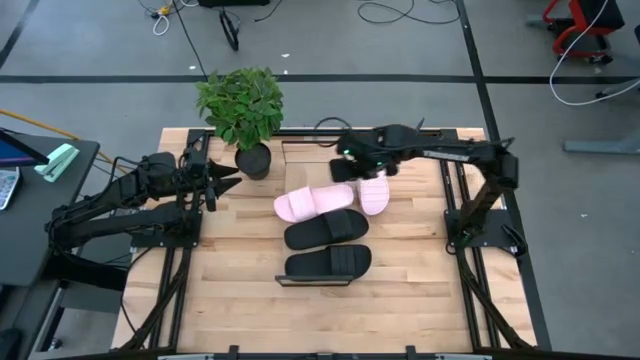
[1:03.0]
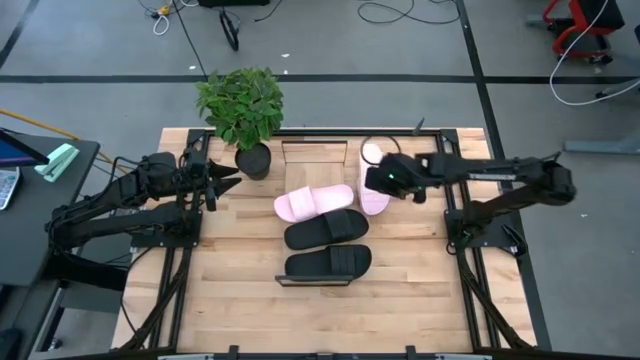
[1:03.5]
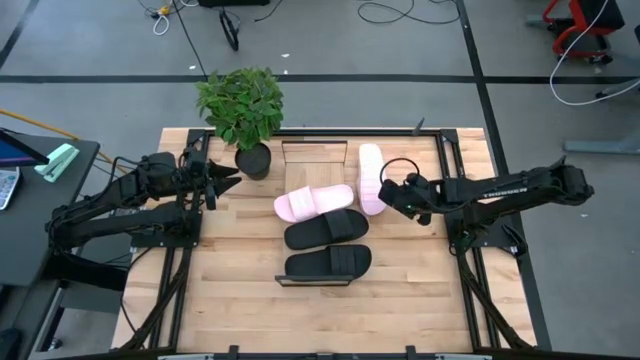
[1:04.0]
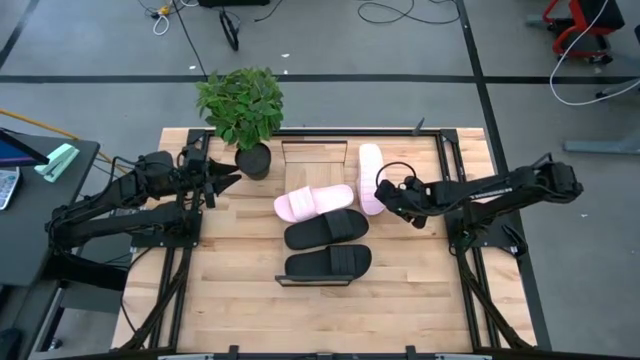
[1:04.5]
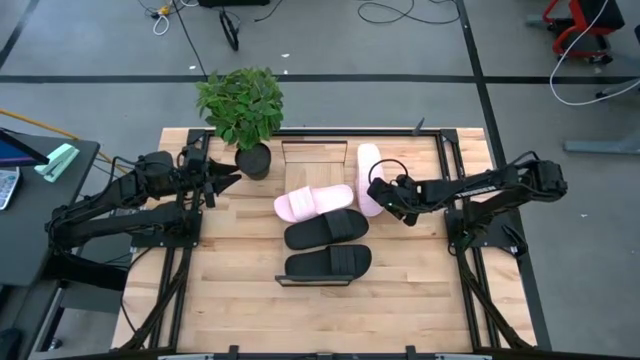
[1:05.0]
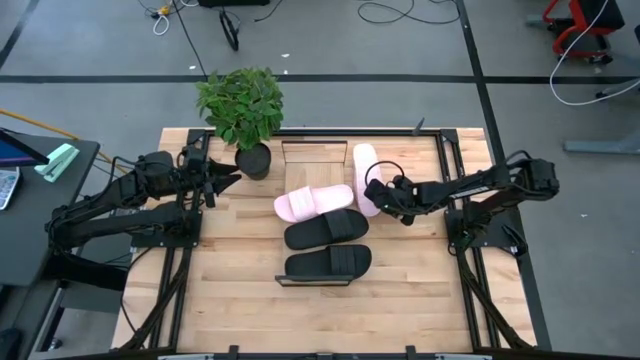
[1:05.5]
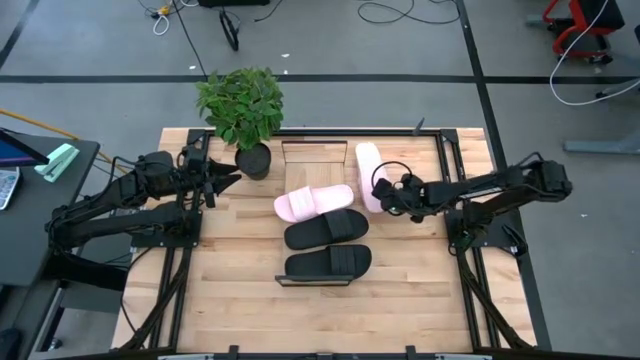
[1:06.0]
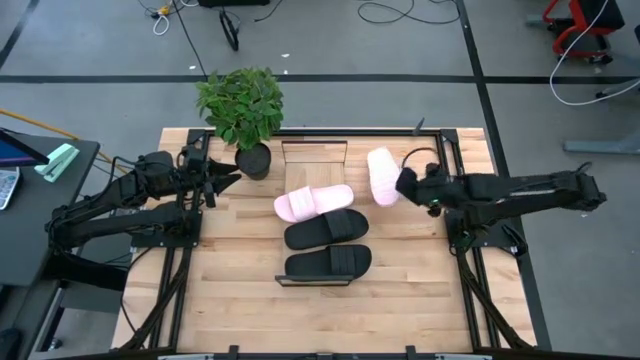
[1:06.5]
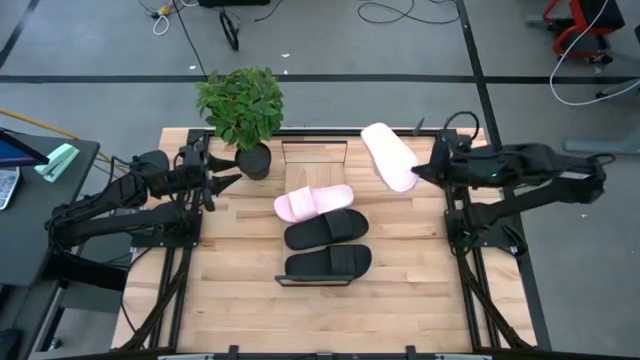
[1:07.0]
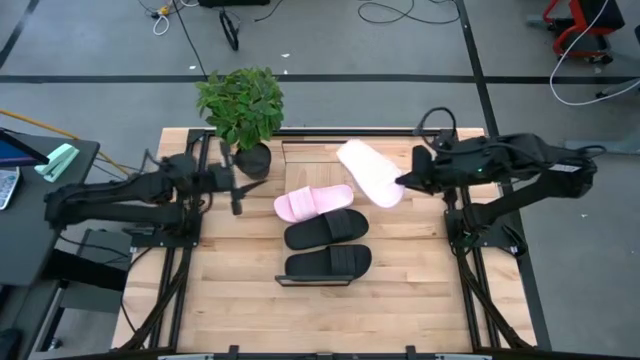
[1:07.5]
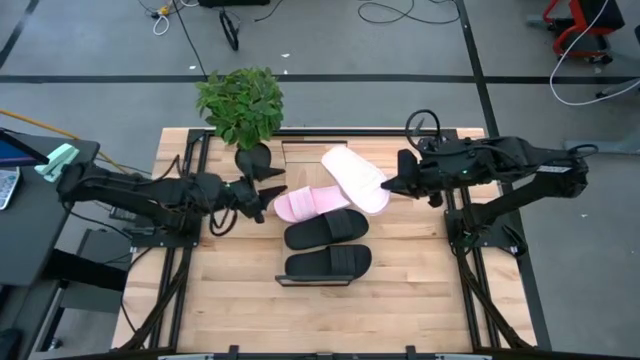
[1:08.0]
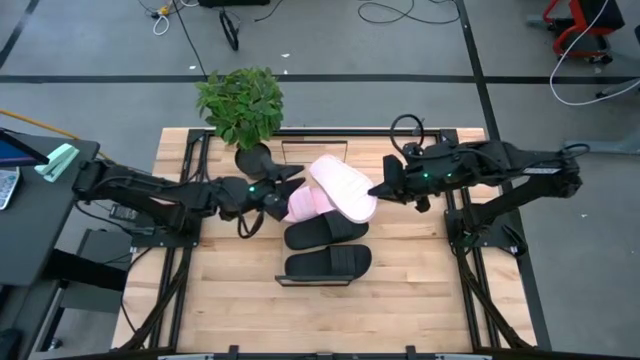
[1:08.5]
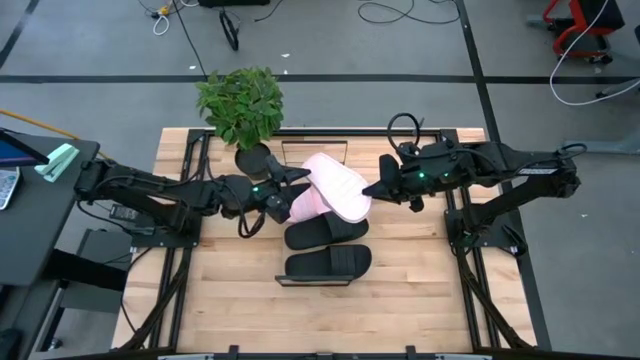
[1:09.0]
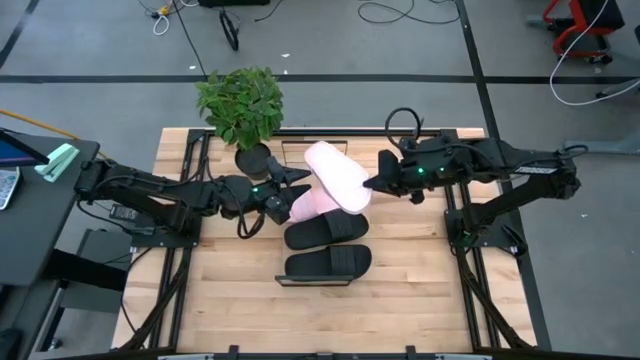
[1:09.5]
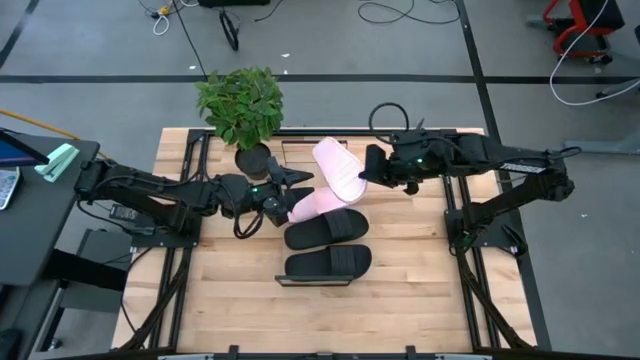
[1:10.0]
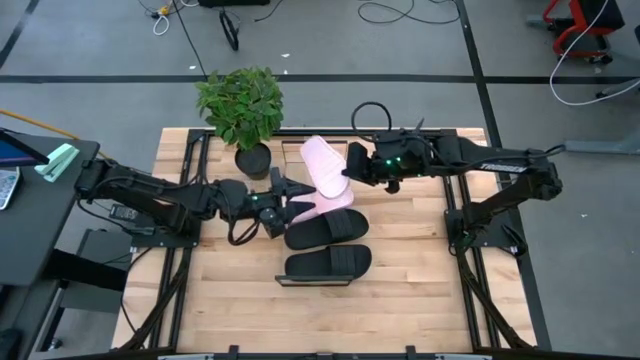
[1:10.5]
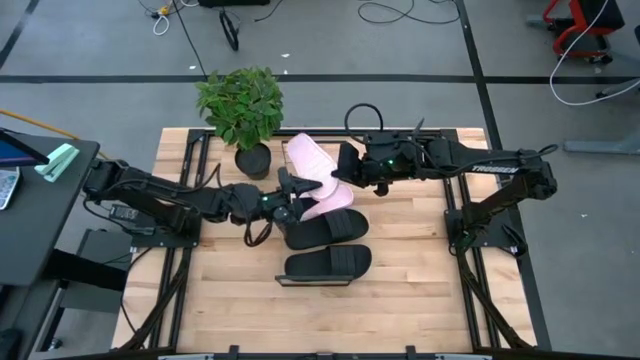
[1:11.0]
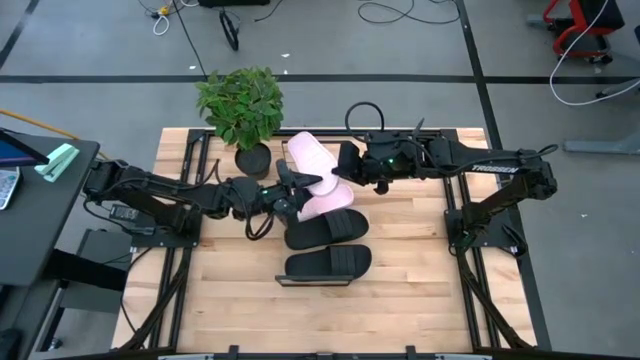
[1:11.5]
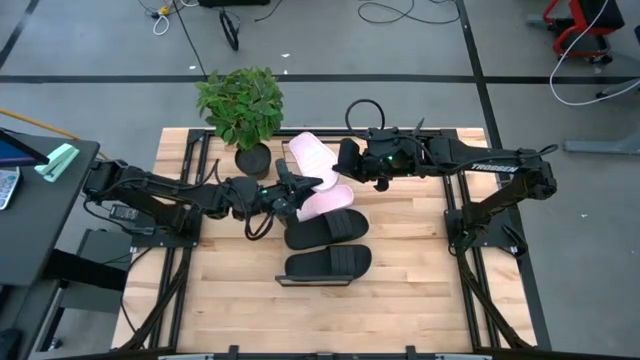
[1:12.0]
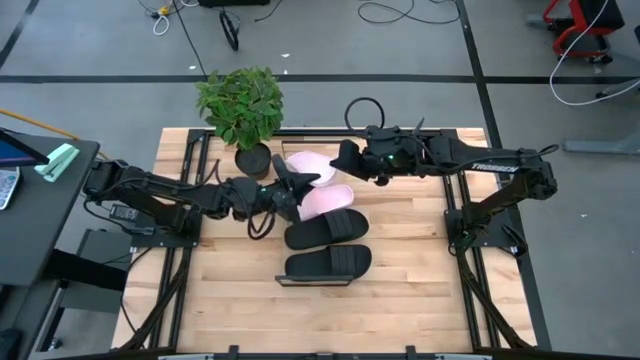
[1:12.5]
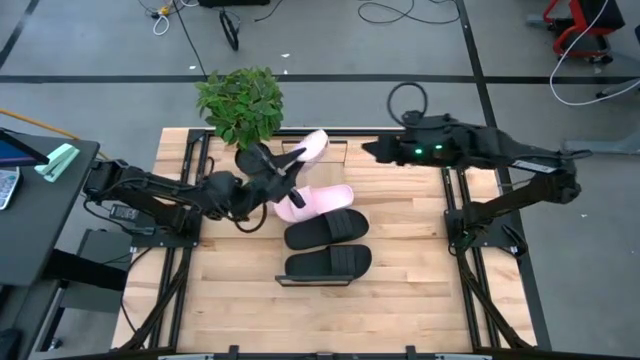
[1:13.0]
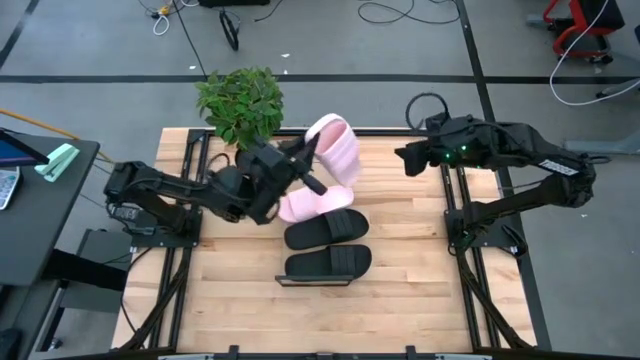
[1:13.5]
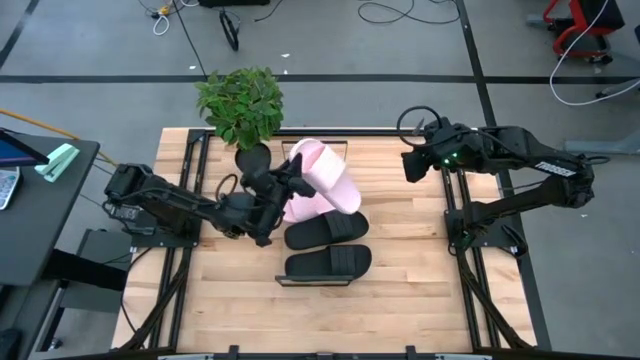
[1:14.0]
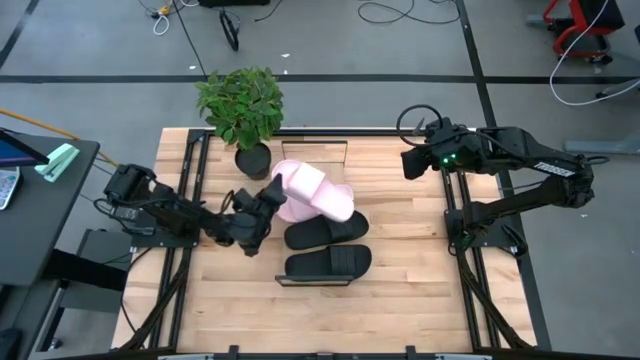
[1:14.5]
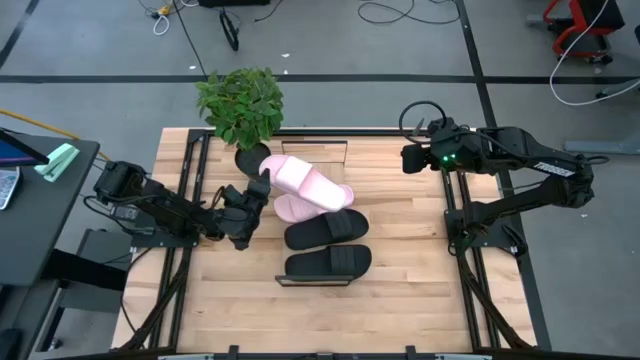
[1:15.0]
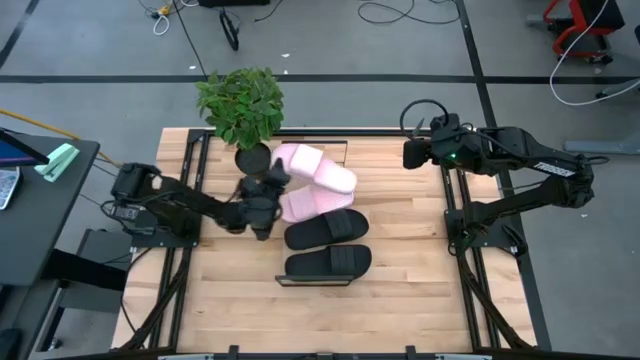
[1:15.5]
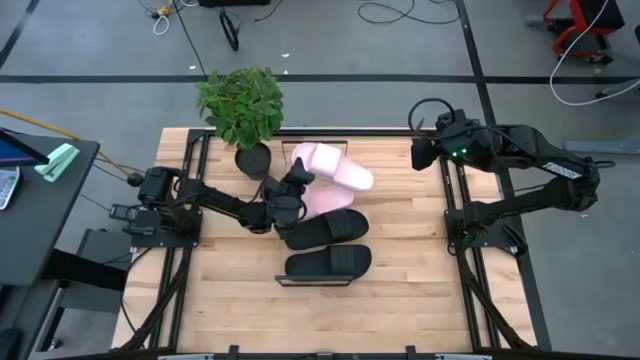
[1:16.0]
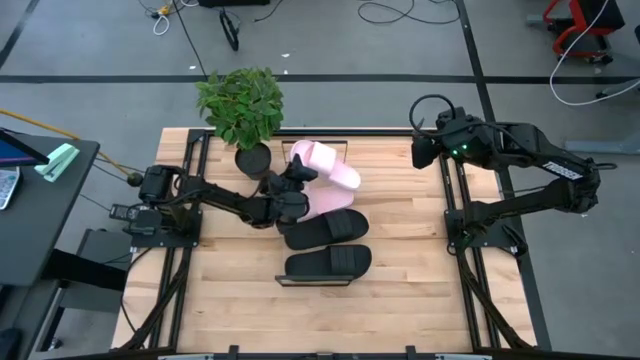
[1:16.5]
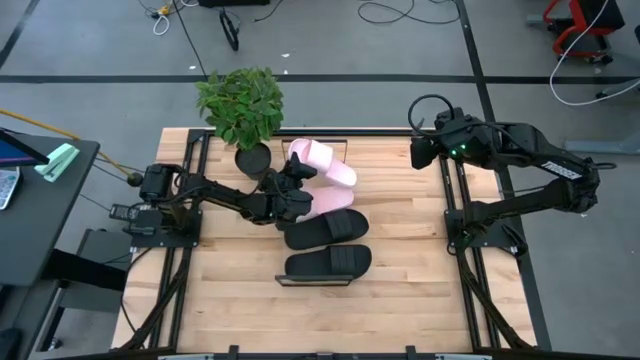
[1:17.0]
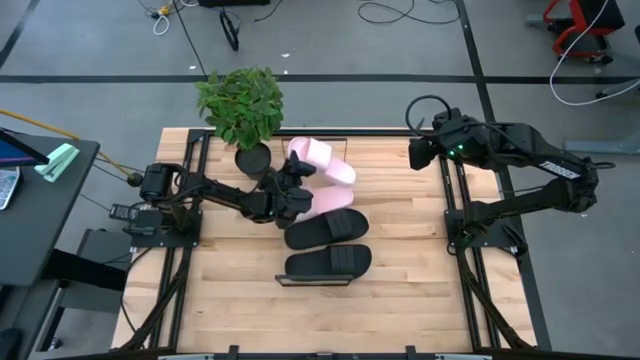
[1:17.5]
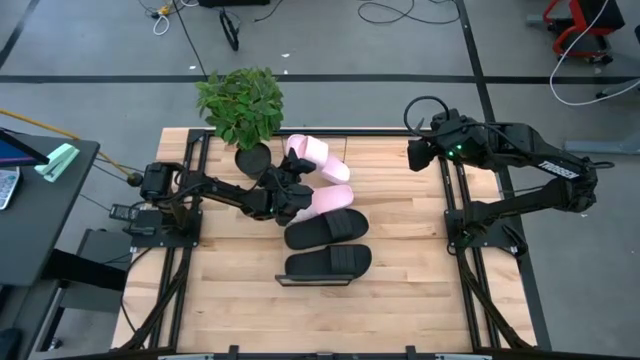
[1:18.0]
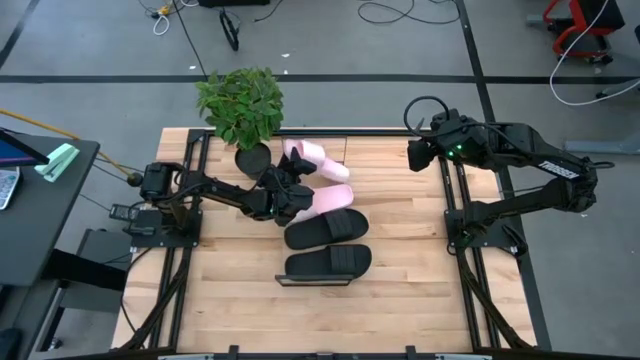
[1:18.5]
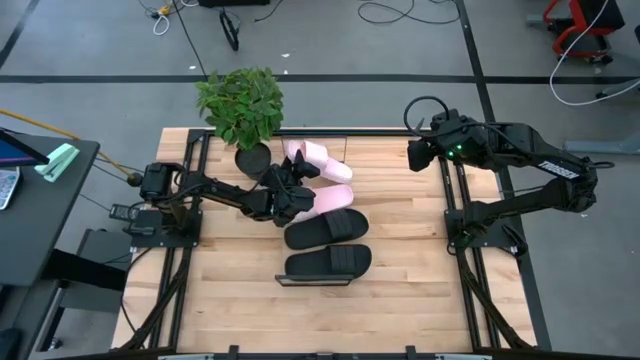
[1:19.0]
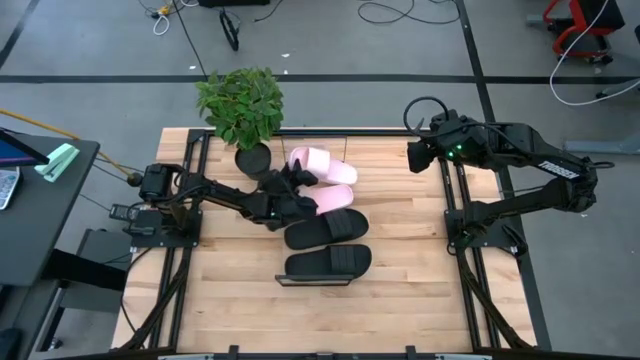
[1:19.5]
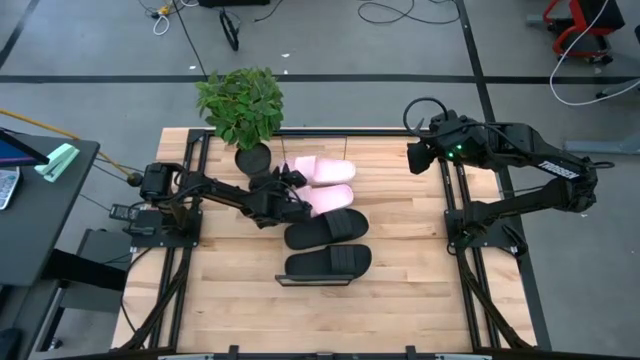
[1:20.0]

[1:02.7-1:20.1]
Task: Pick and place slides into the shelf
Put the pink slipper on the shelf

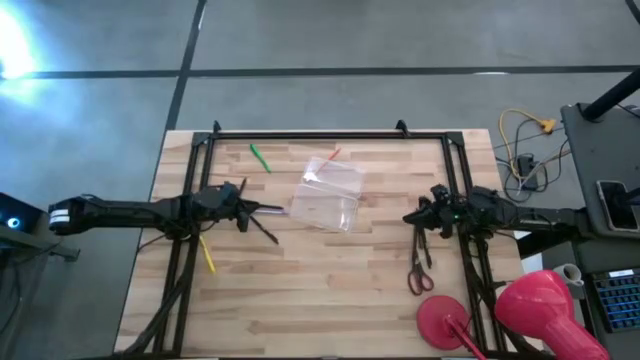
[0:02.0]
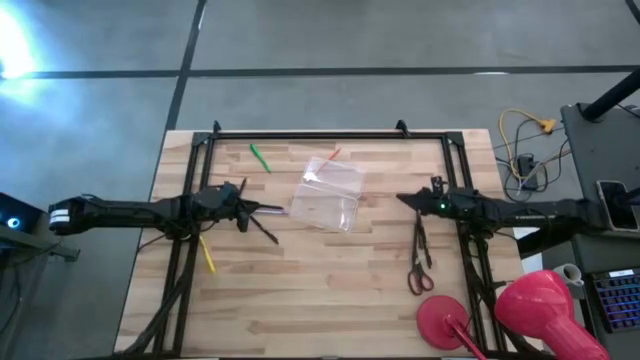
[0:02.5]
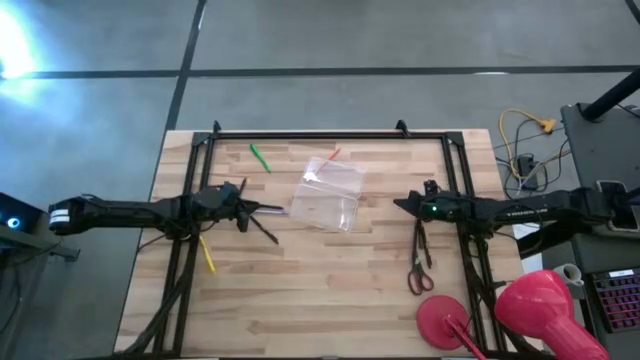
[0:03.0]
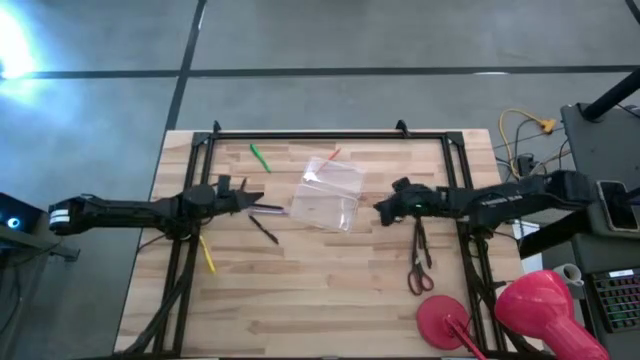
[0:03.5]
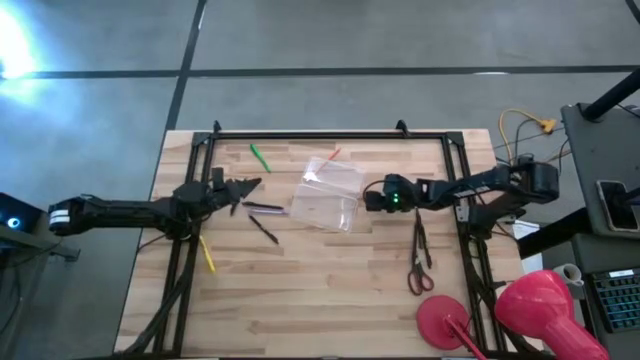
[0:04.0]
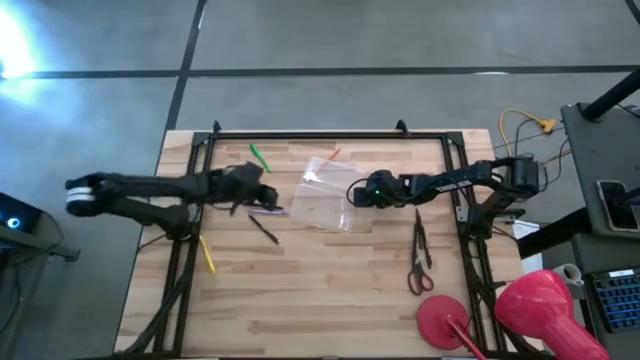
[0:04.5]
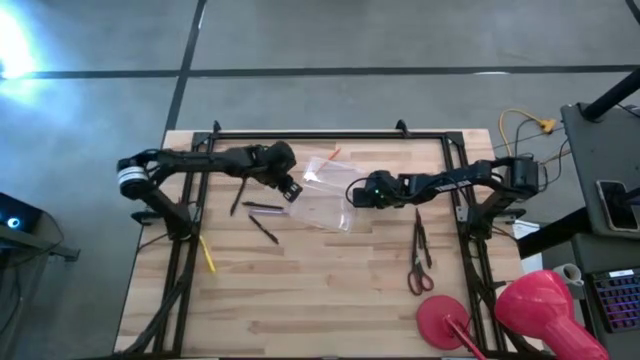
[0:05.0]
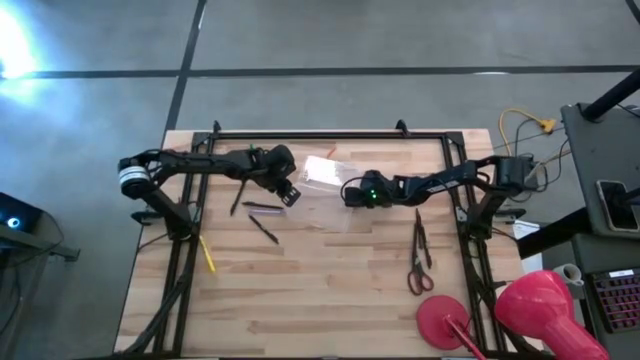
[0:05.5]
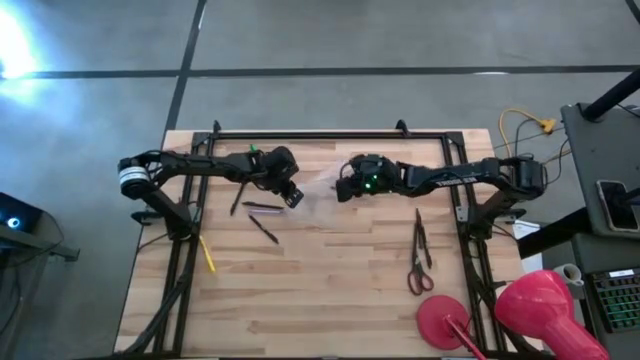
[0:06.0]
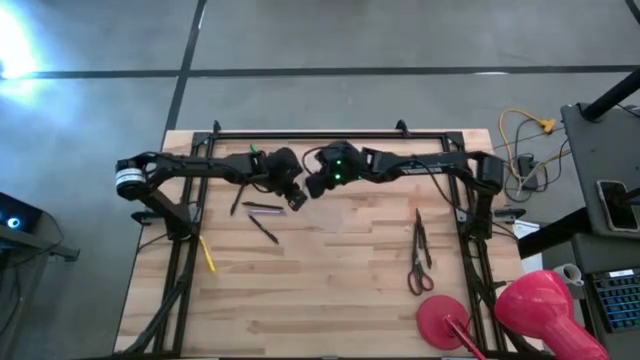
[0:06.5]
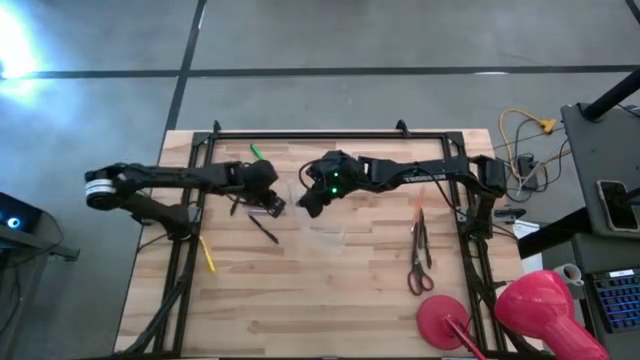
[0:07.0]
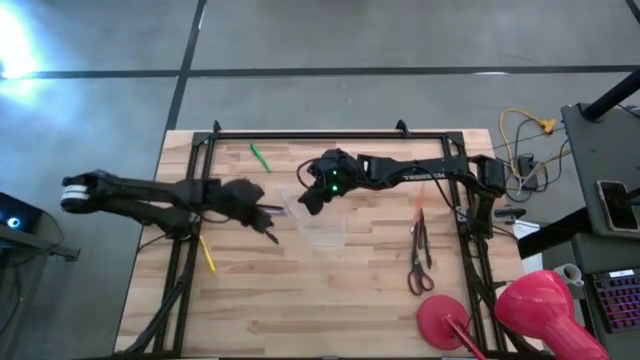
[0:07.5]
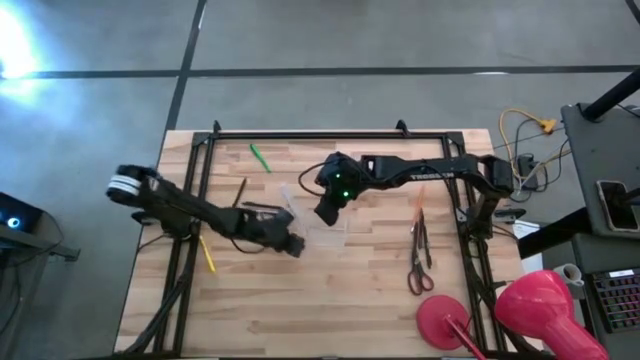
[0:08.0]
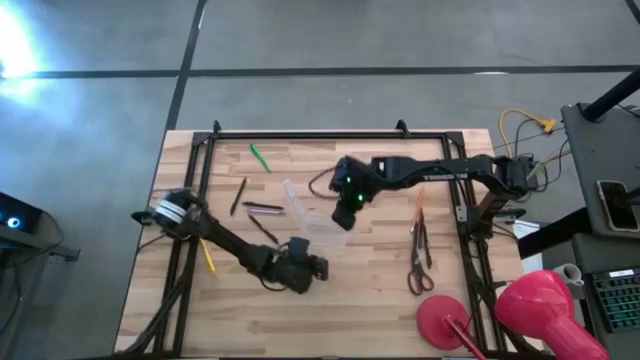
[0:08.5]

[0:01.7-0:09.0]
Task: Pick & place school supplies into a supply box
Prepare the transparent supply box
